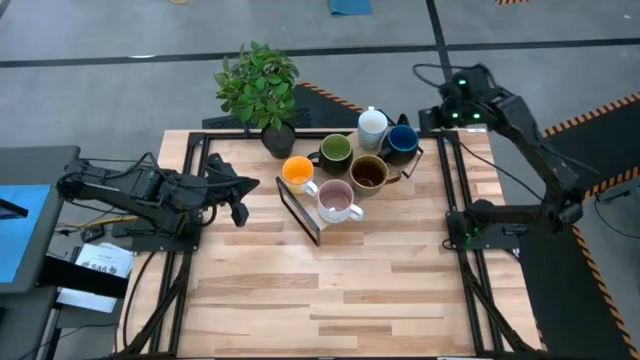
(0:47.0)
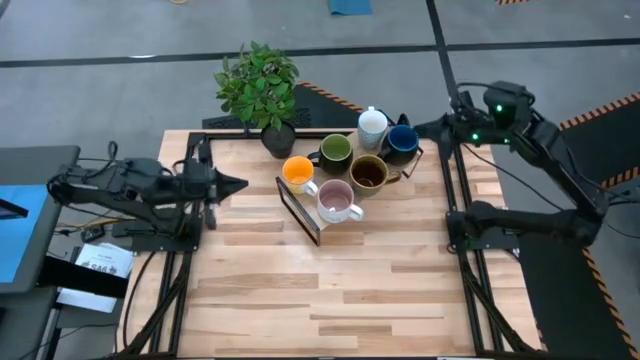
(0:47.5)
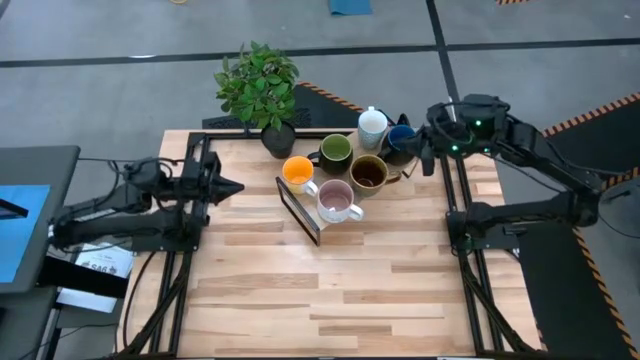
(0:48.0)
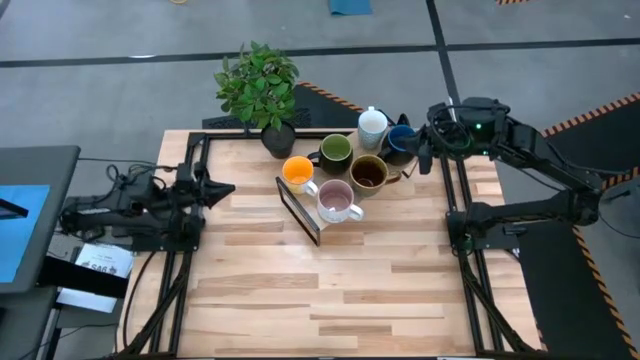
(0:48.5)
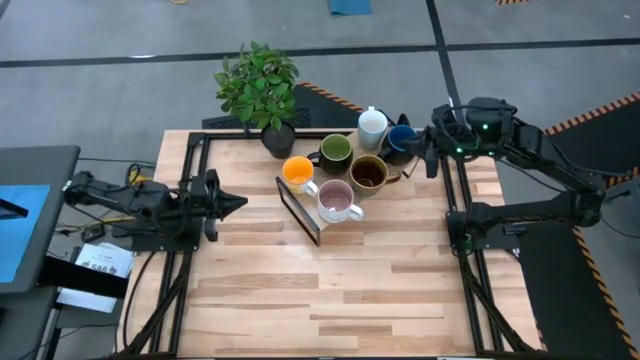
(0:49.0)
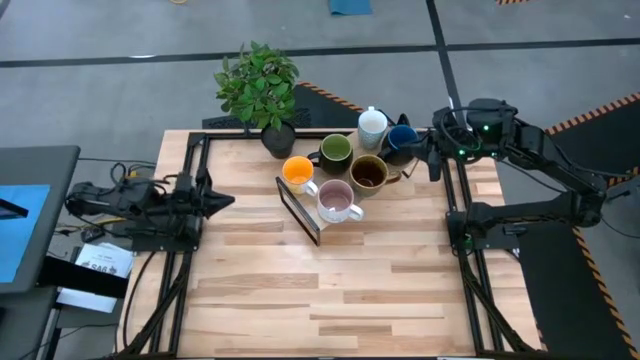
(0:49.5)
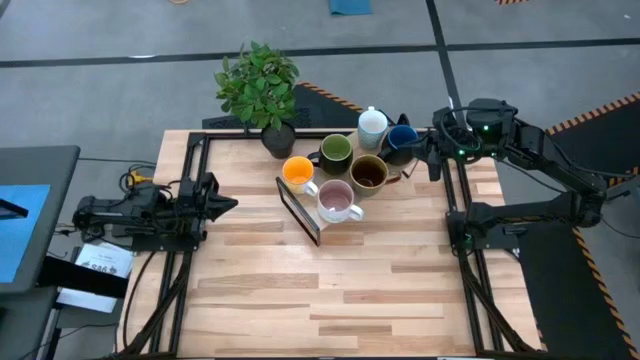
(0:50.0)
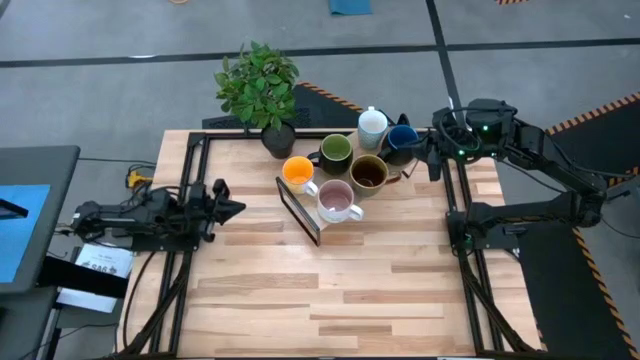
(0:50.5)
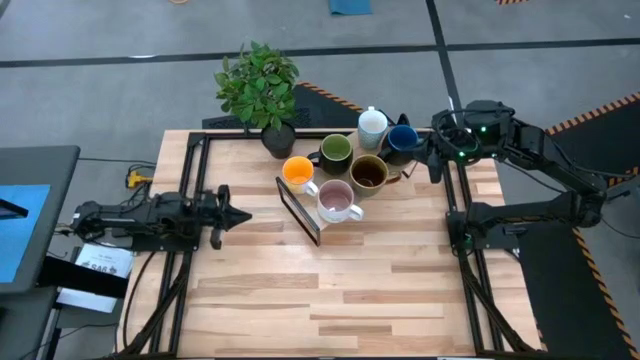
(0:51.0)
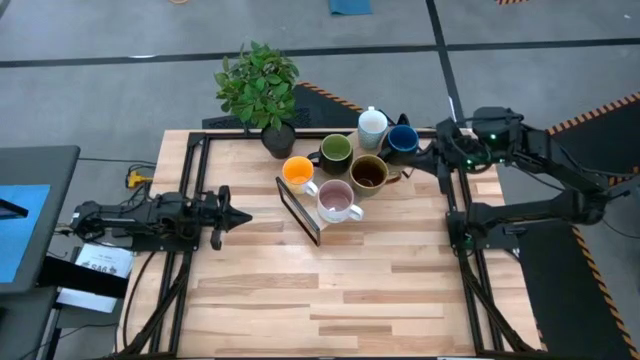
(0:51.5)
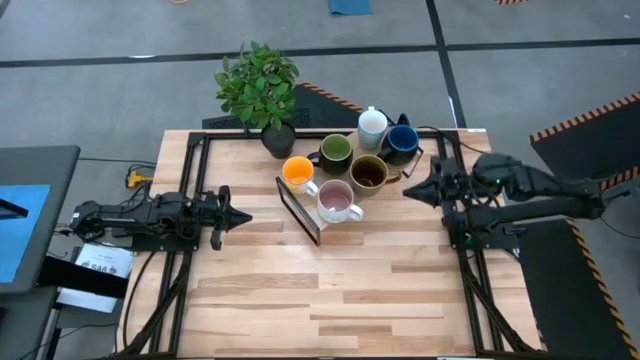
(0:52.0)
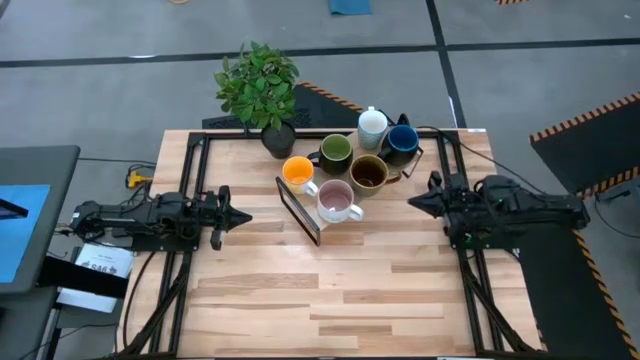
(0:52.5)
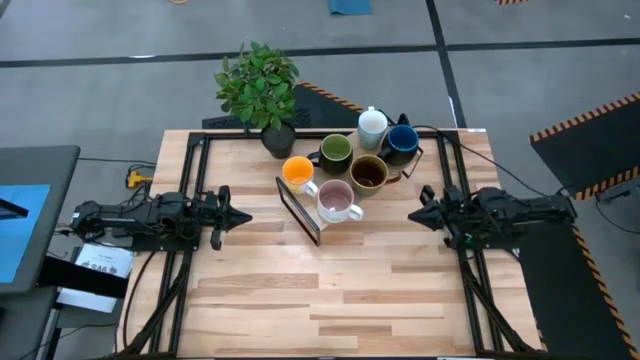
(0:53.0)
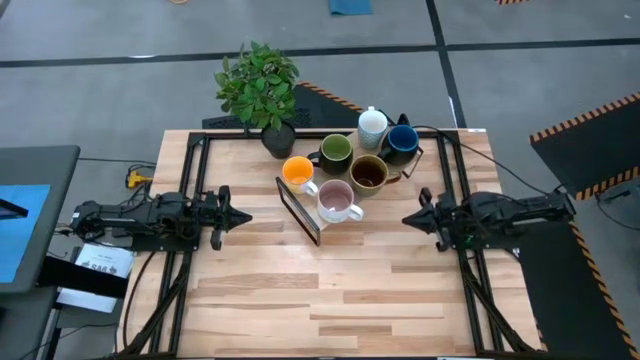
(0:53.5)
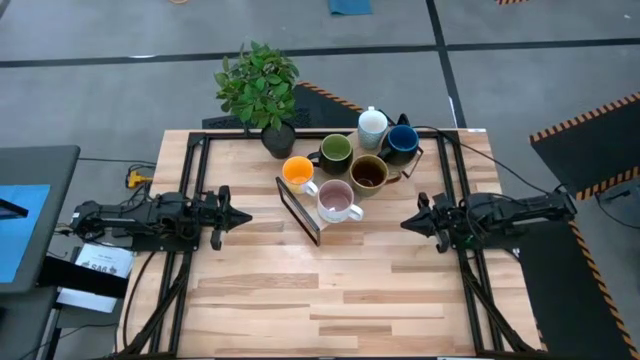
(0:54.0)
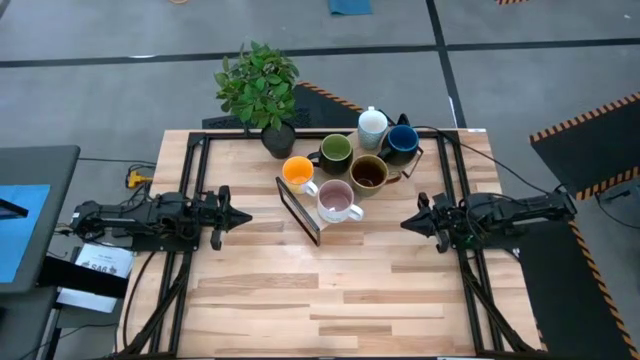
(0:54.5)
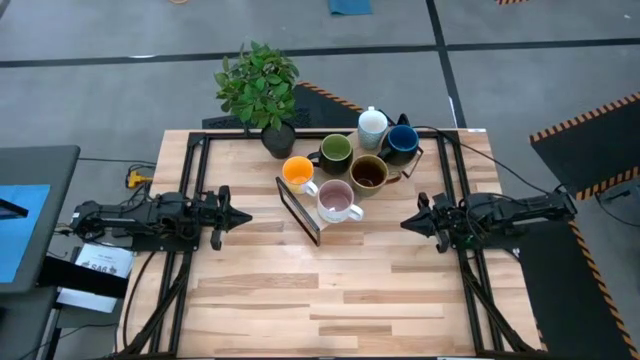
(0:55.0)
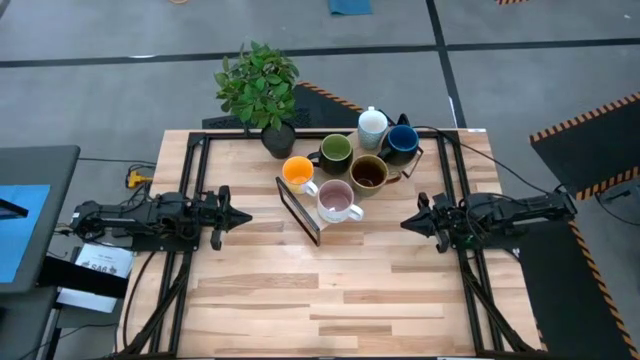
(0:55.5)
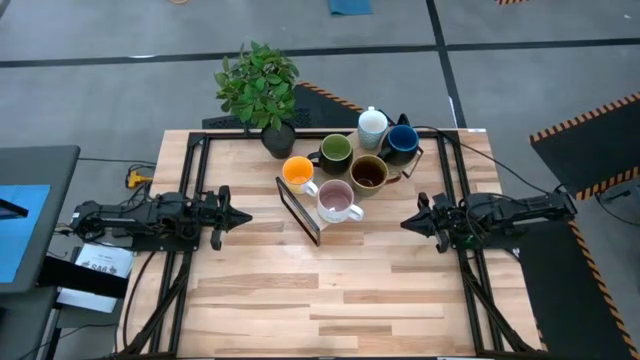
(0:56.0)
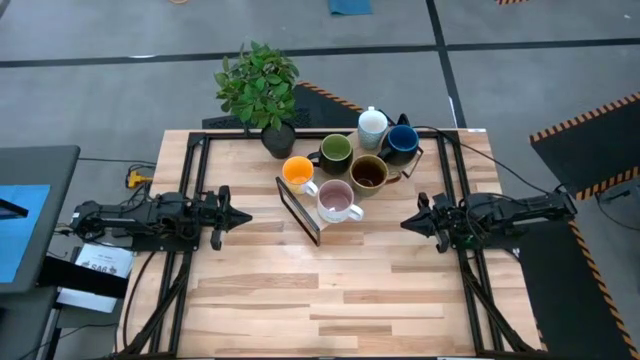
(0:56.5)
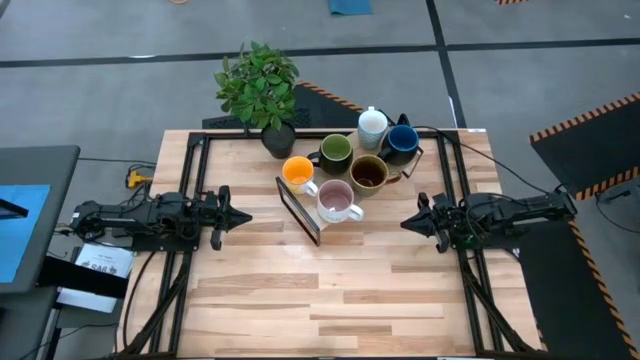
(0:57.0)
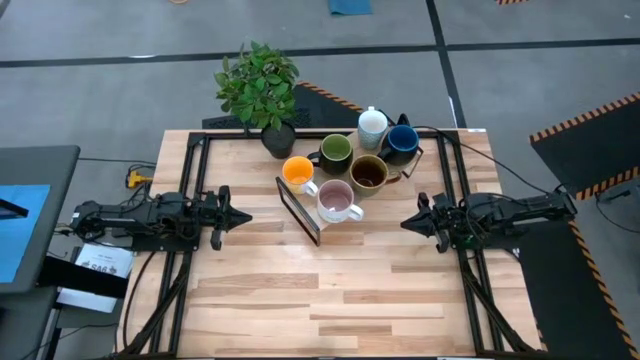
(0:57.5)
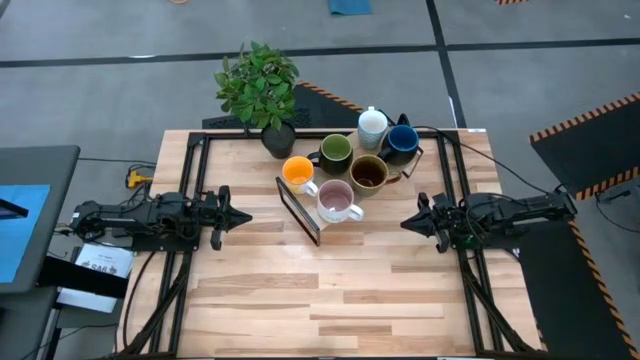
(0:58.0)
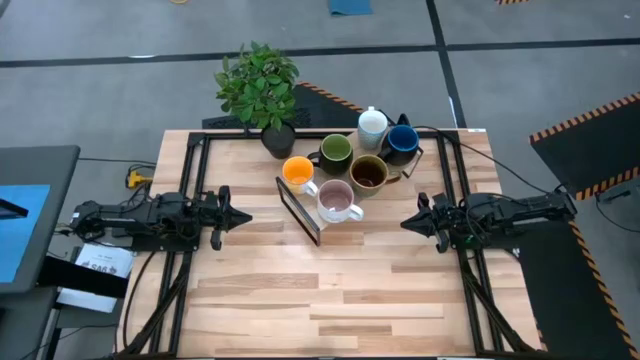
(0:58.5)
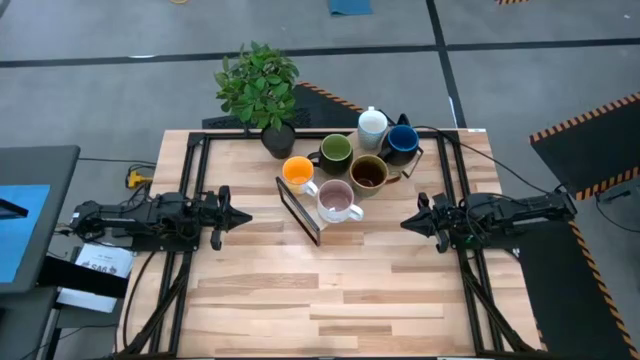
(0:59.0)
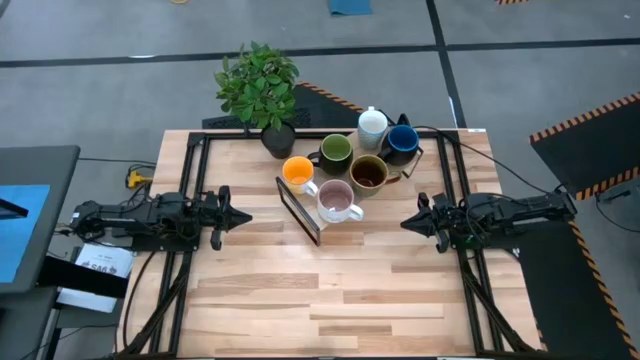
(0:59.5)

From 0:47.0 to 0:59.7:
Task: Place coffee mugs
Return to Home Position

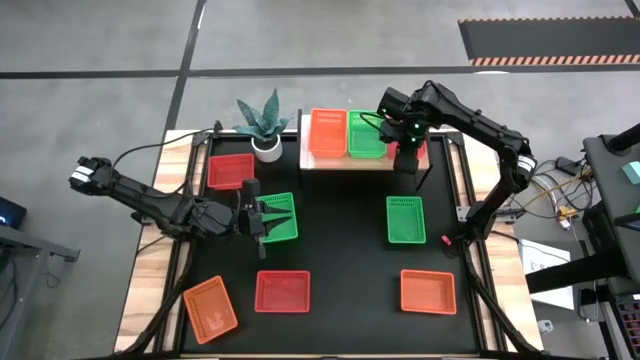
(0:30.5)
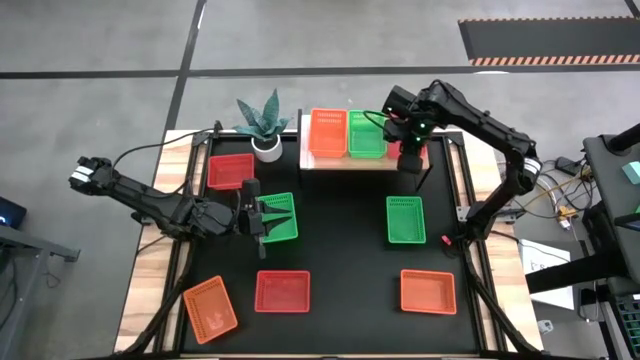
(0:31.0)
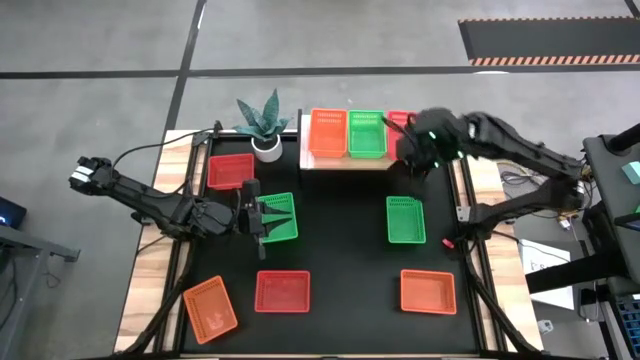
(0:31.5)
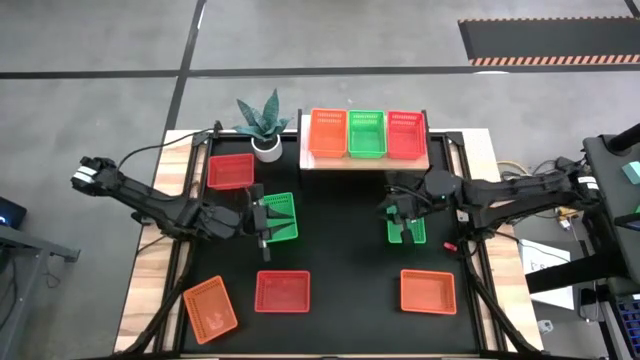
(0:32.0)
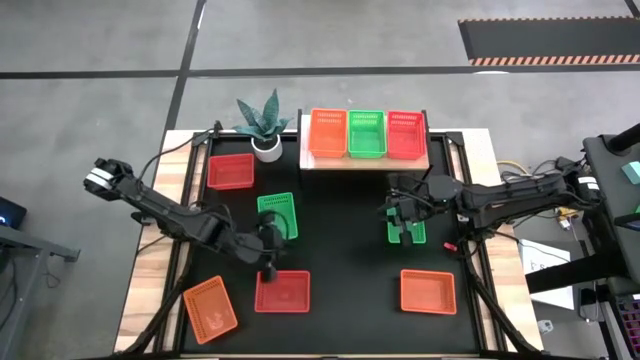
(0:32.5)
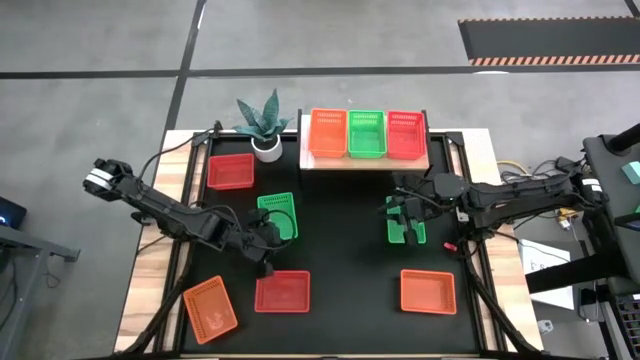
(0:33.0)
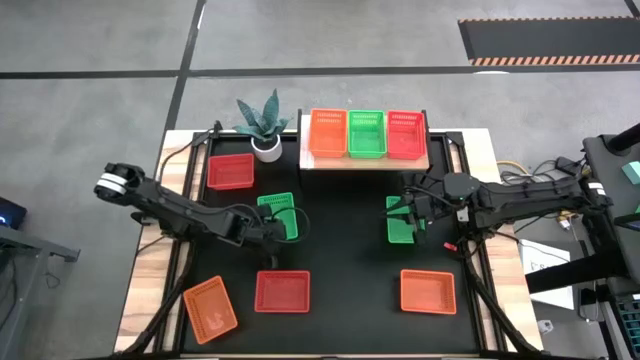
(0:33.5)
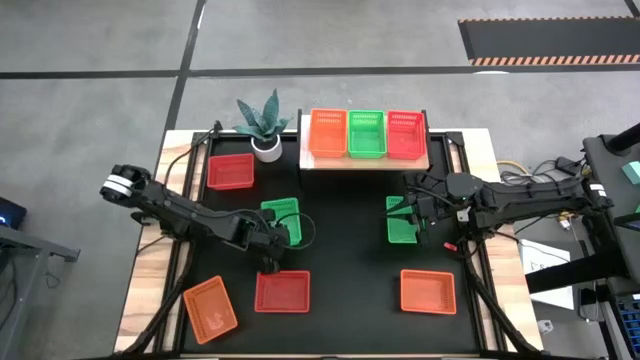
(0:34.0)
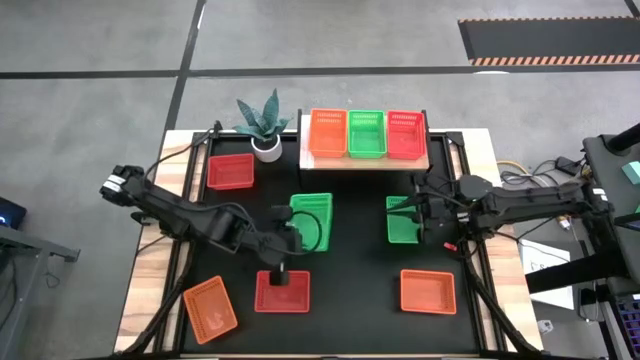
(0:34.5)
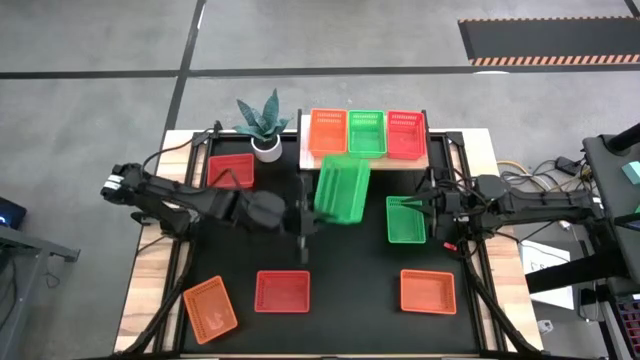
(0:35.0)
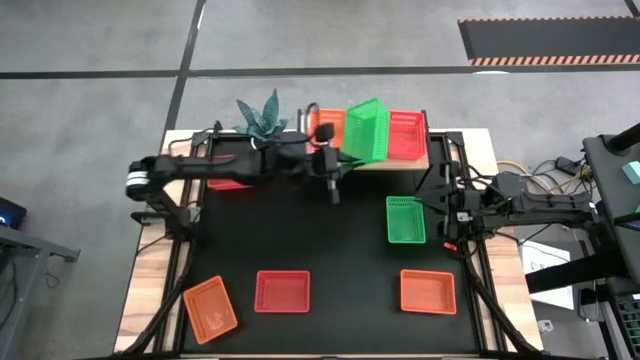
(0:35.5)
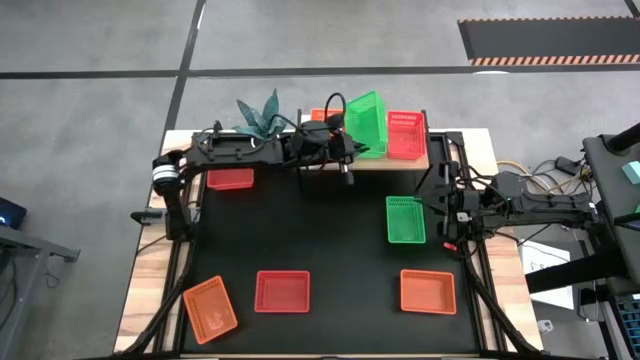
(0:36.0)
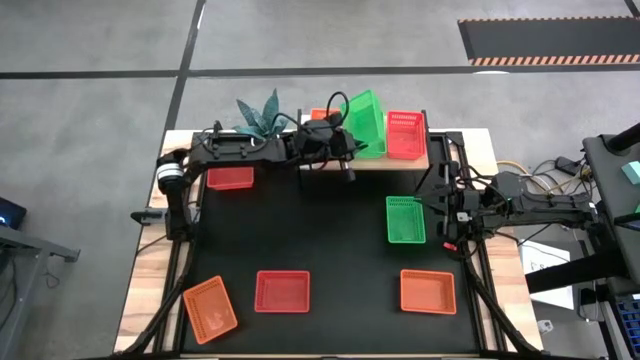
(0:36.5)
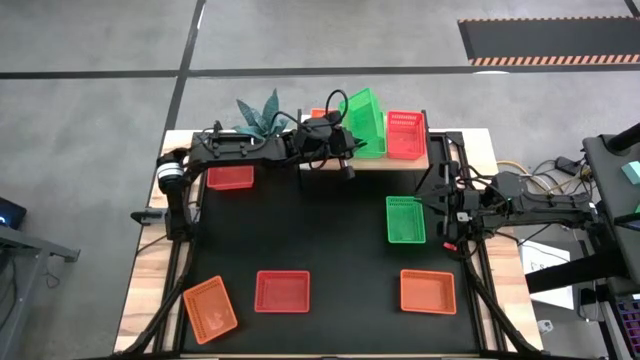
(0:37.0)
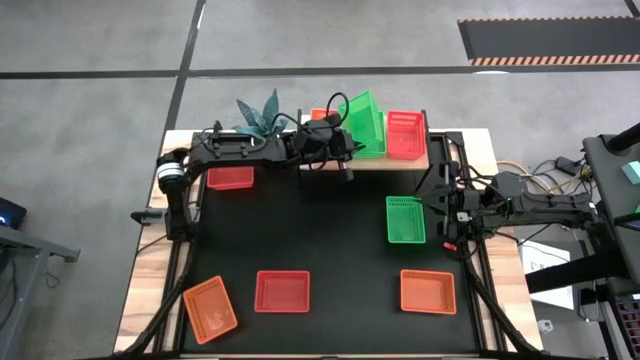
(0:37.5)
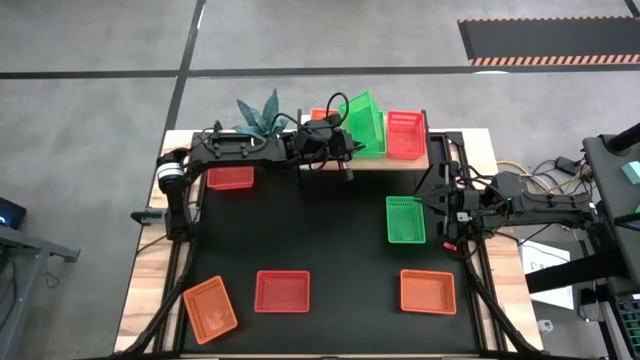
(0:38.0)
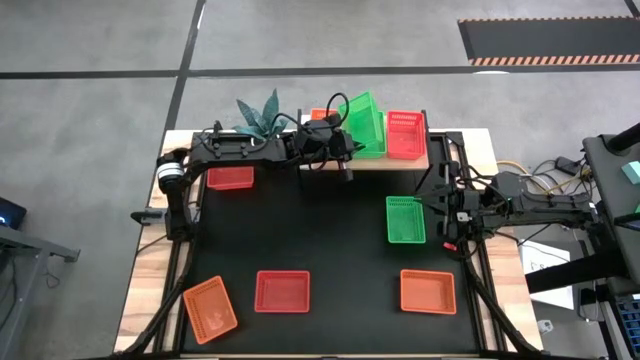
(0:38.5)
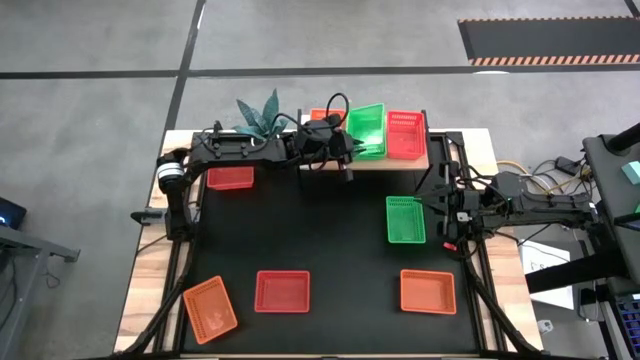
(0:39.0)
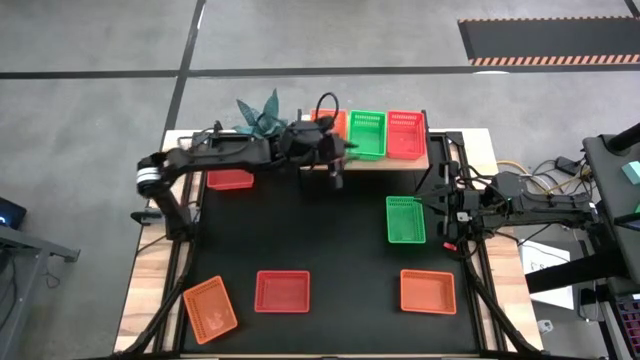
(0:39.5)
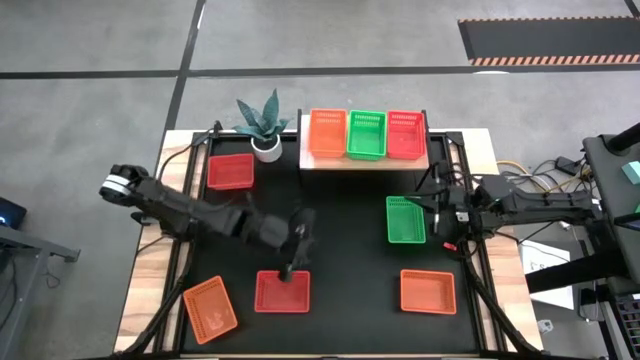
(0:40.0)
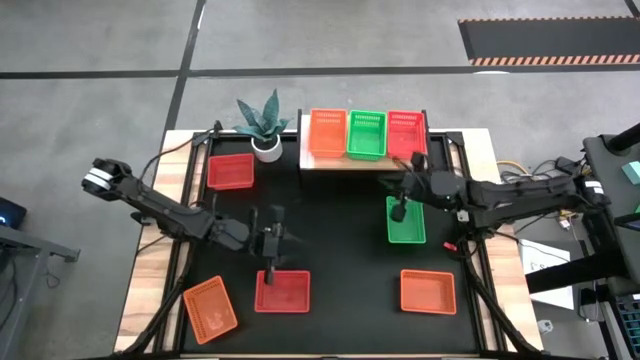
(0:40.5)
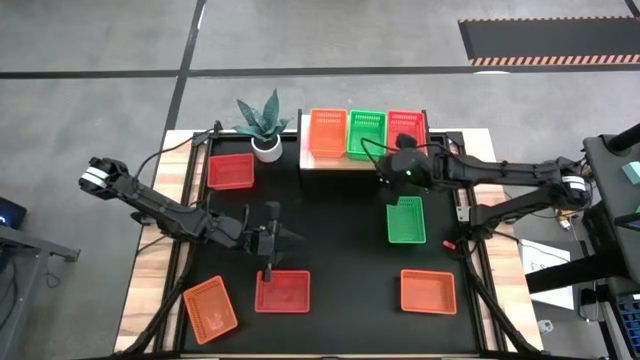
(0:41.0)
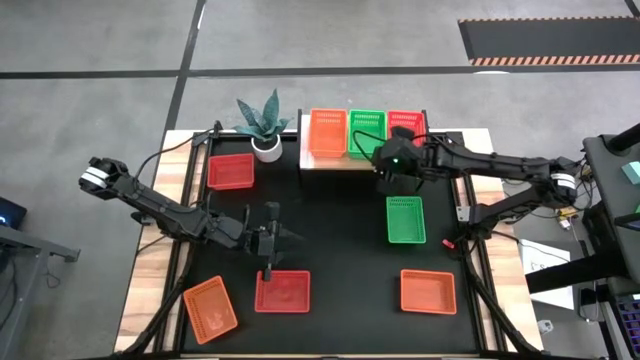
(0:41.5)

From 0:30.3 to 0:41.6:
Task: Stack baskets on shelf by color
Stack the left green bin on top of the green bin on the shelf
